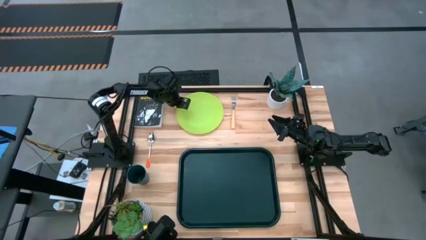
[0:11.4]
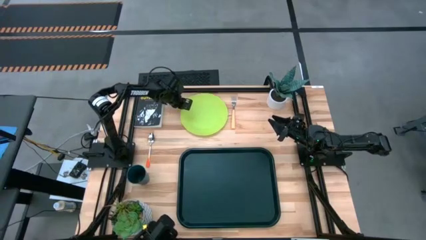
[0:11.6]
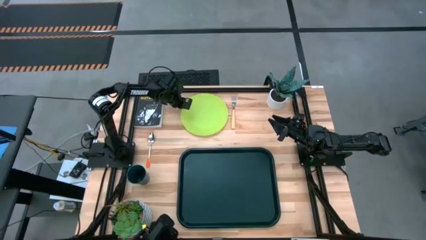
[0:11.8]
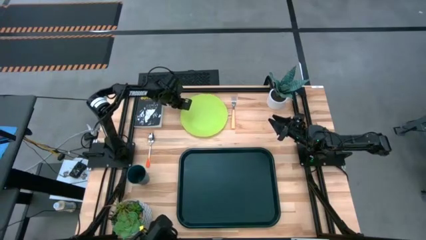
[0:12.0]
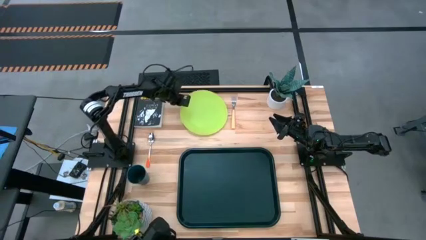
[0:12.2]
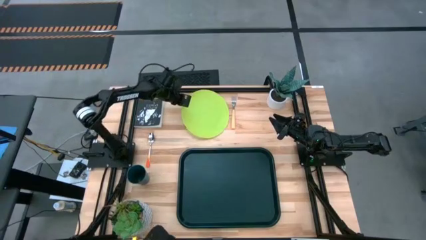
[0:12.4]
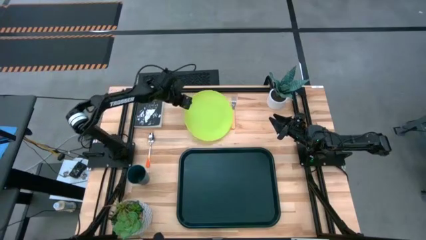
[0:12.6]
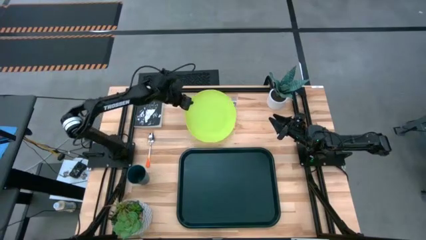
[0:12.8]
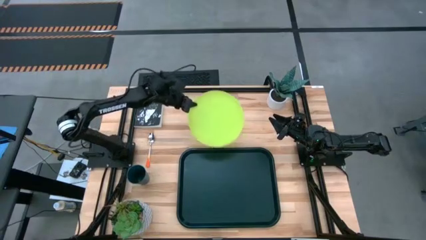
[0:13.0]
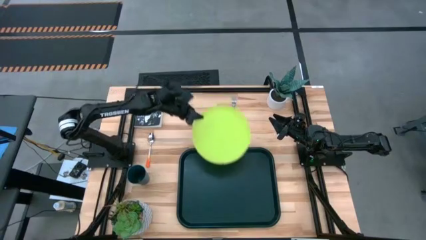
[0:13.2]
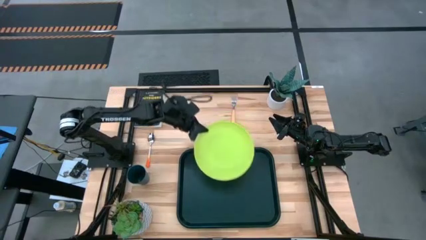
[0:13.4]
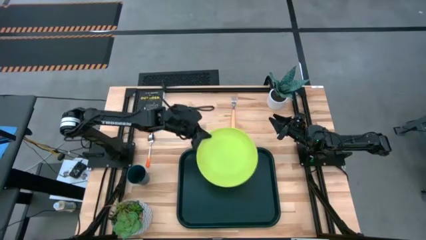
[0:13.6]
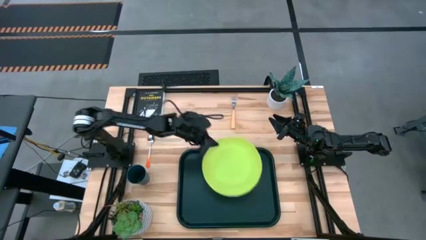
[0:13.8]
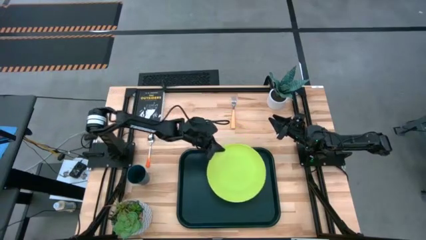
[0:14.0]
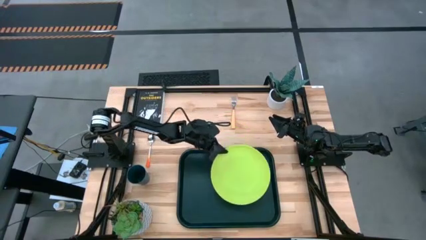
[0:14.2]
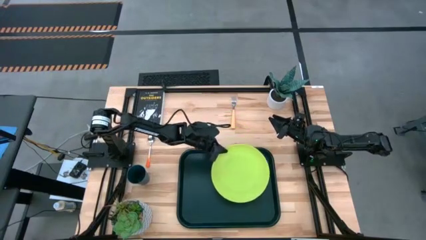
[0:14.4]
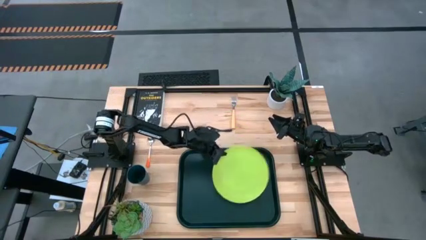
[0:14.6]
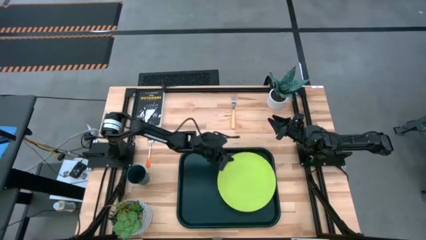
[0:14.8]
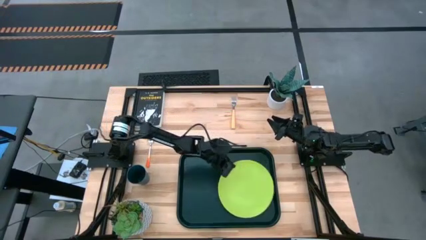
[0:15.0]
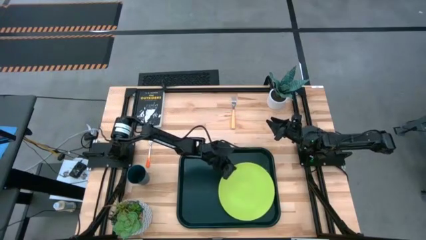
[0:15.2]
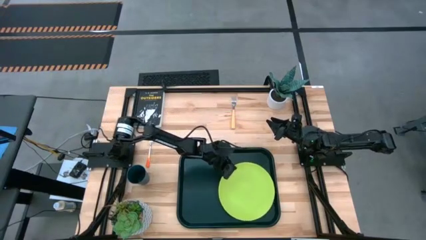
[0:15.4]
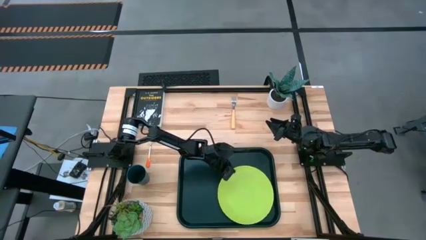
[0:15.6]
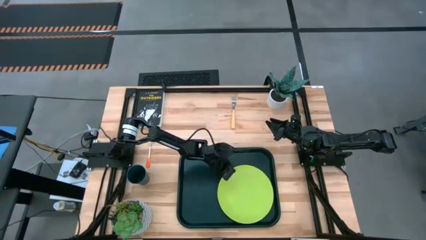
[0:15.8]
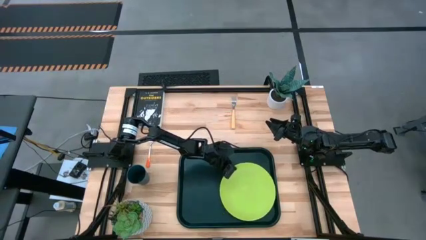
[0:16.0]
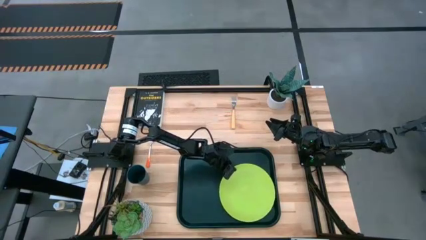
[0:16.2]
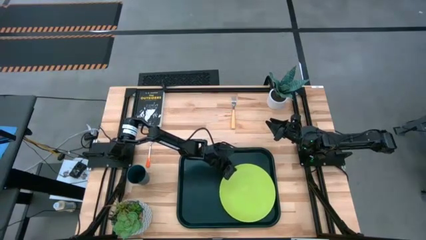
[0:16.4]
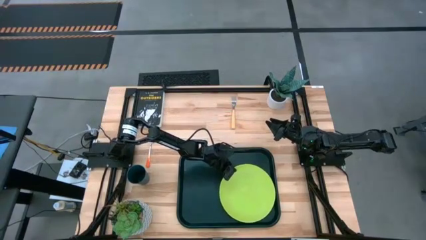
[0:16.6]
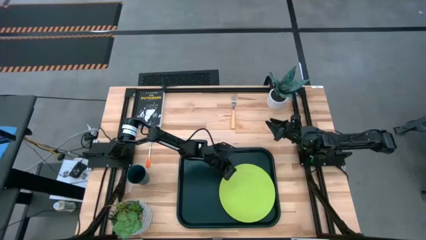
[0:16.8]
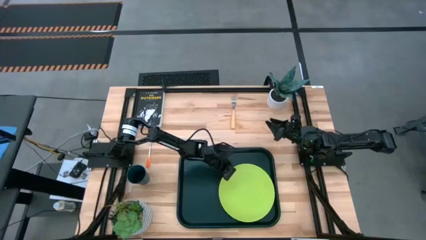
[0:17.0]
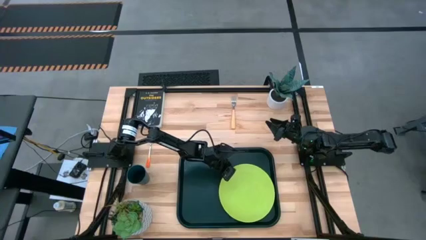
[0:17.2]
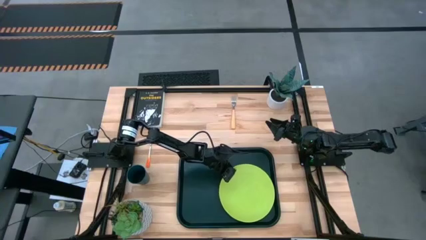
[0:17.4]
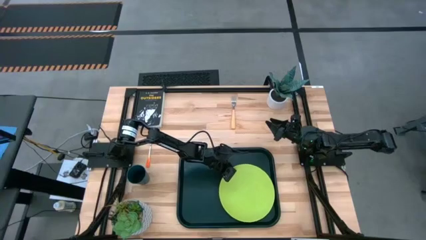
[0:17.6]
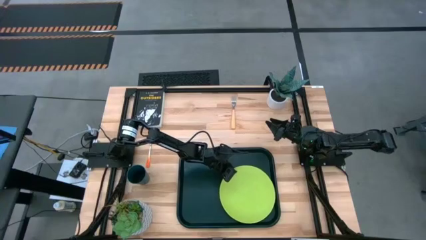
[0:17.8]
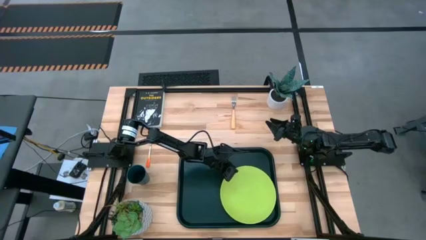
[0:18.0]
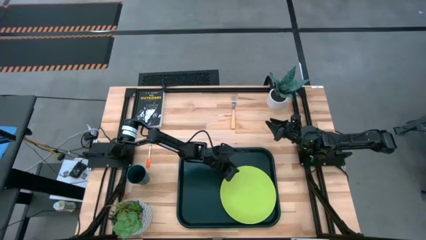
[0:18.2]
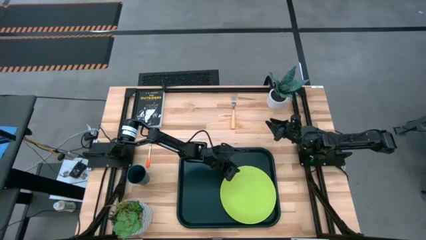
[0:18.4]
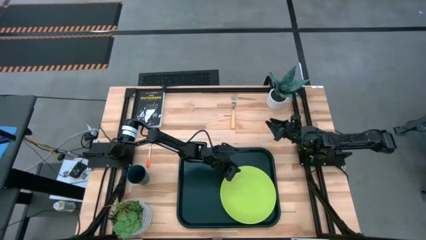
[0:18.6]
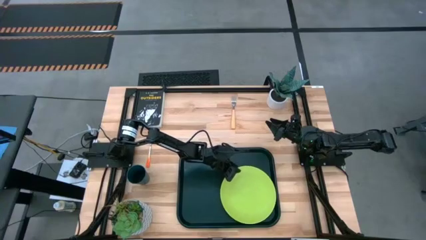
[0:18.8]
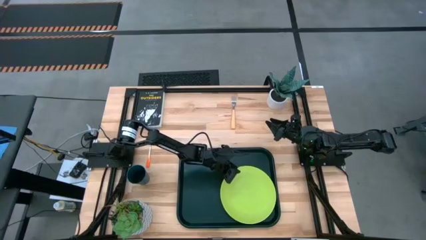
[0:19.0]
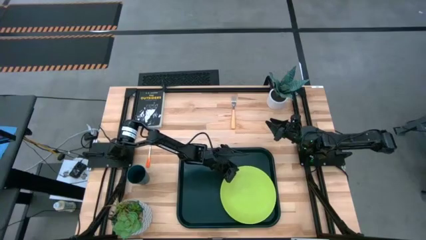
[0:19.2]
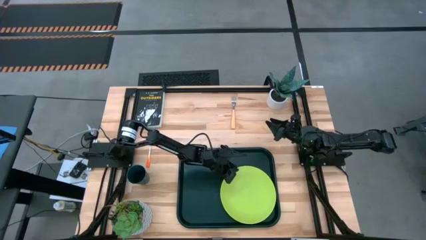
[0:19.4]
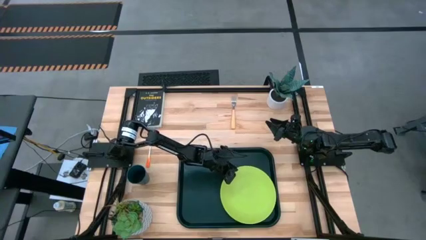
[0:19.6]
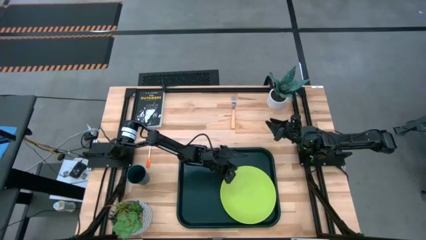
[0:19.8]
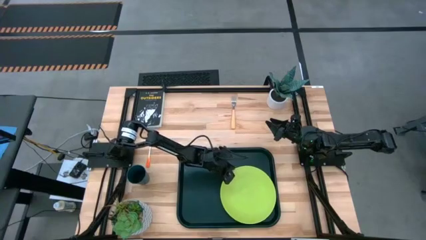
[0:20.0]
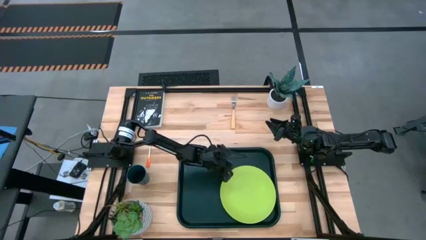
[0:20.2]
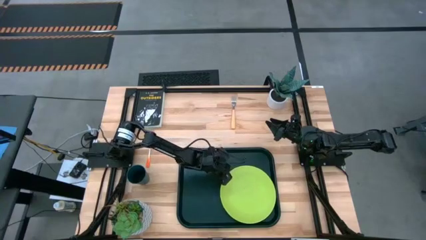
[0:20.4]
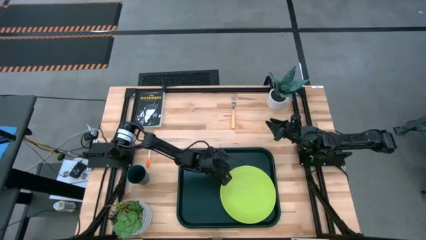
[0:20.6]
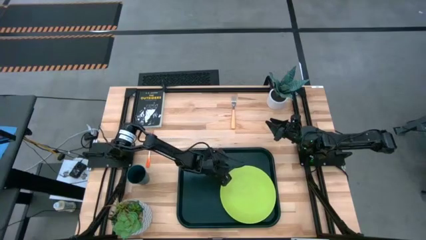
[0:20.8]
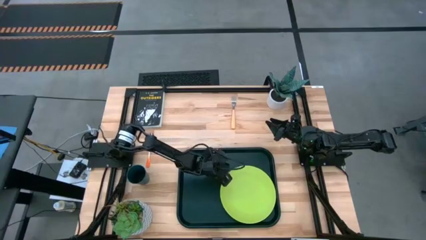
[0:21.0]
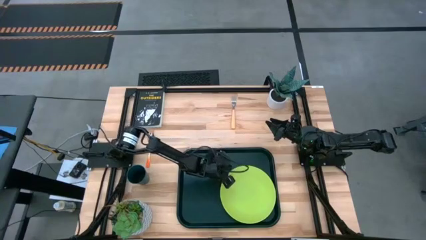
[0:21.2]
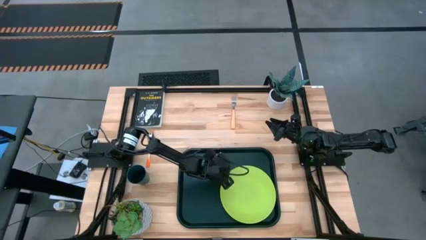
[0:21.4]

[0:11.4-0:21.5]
Task: Pick and place plate/cup/fork/spoon on tray
Put the light green plate on the bottom right of the black serving tray

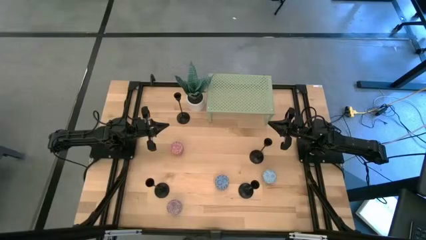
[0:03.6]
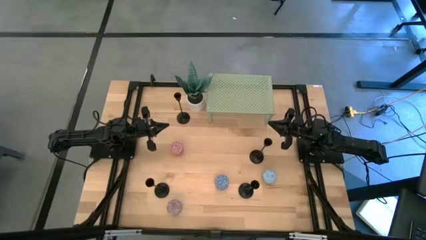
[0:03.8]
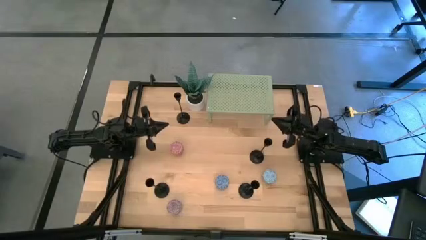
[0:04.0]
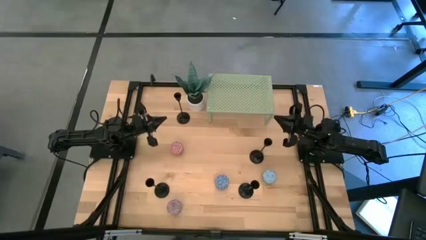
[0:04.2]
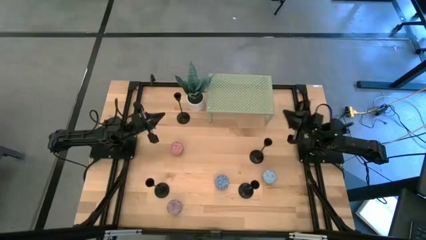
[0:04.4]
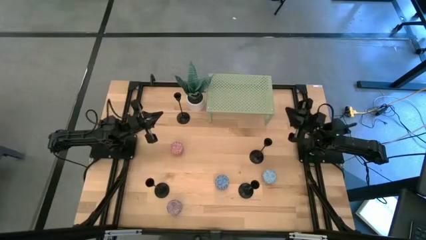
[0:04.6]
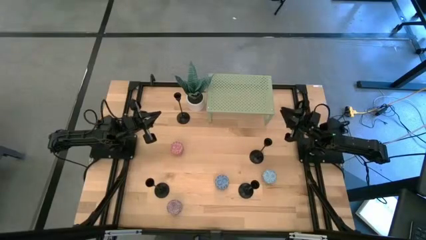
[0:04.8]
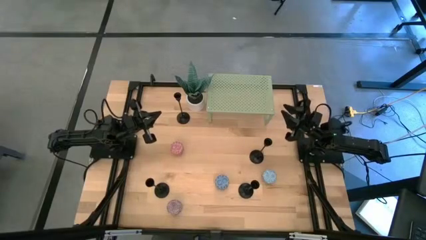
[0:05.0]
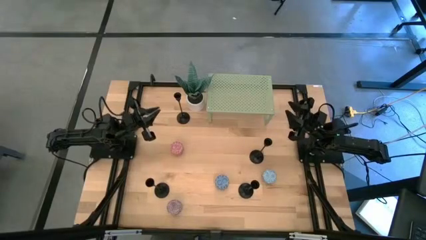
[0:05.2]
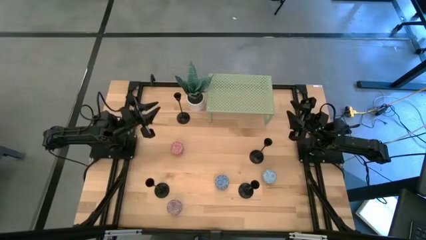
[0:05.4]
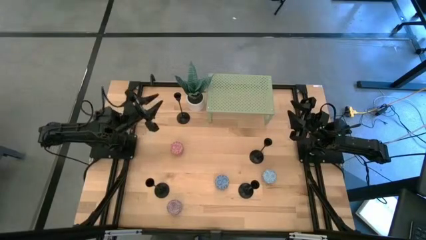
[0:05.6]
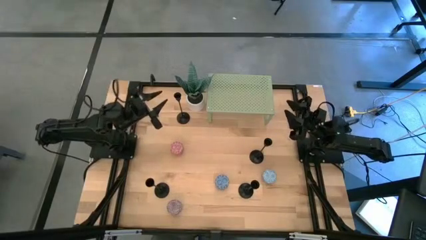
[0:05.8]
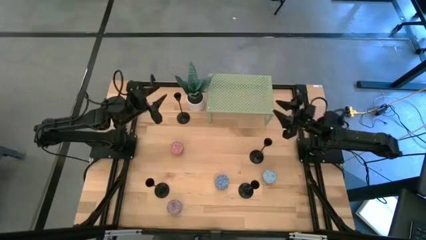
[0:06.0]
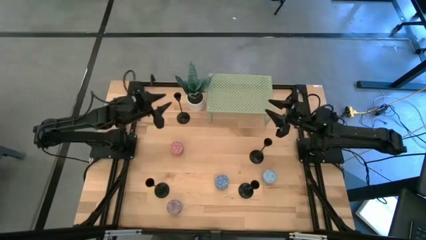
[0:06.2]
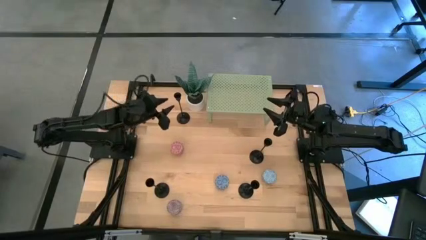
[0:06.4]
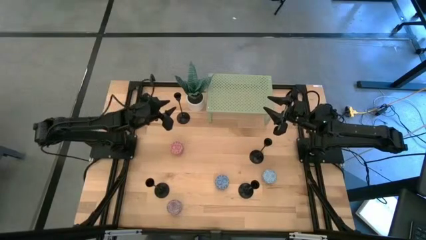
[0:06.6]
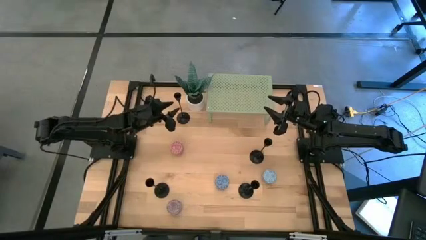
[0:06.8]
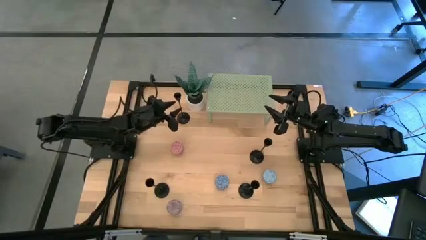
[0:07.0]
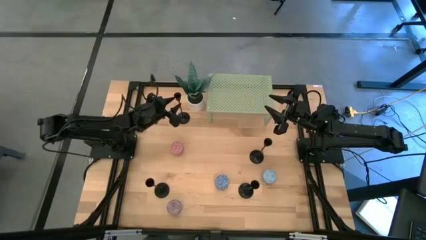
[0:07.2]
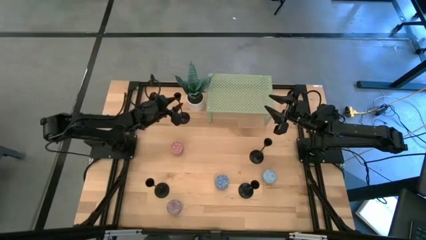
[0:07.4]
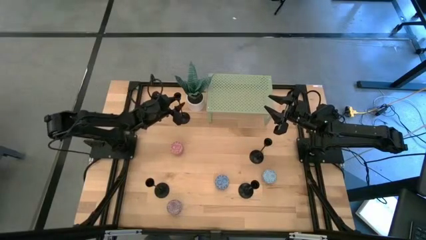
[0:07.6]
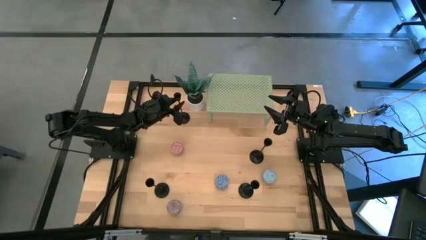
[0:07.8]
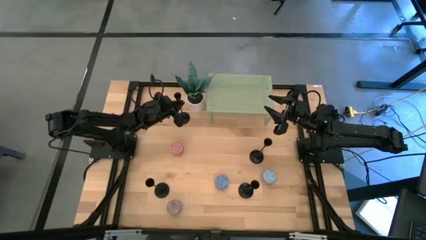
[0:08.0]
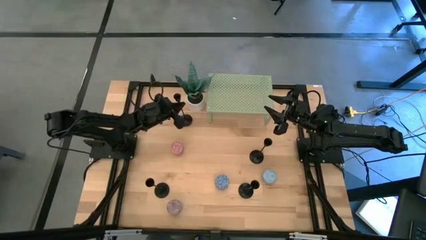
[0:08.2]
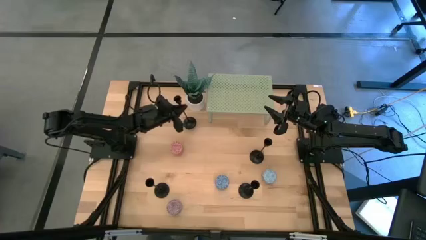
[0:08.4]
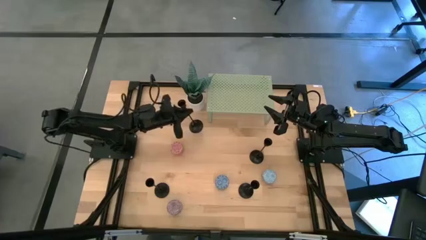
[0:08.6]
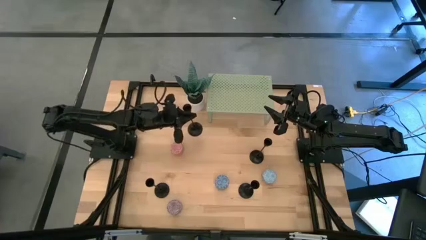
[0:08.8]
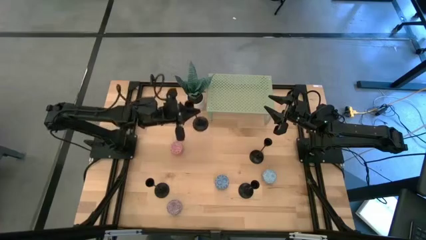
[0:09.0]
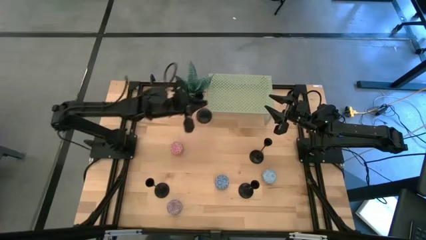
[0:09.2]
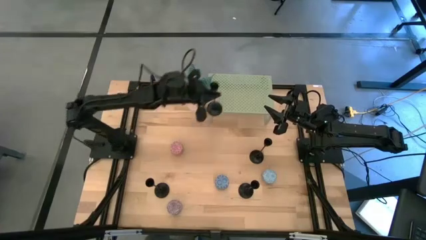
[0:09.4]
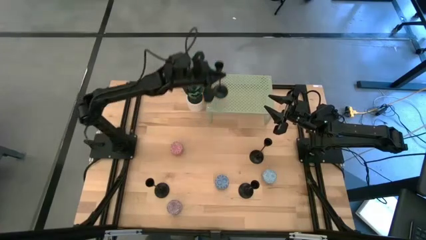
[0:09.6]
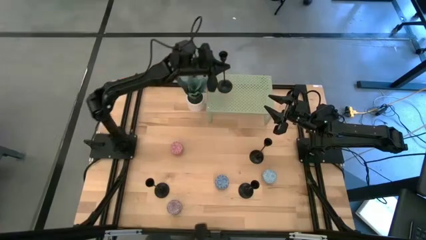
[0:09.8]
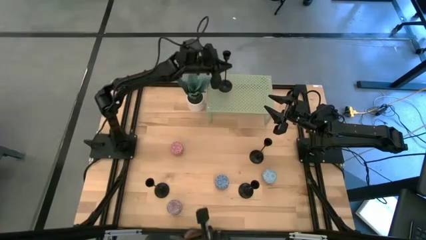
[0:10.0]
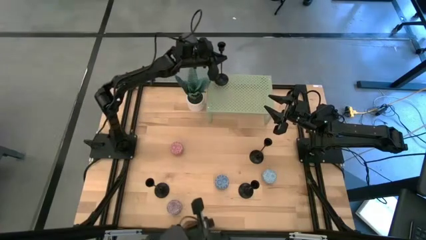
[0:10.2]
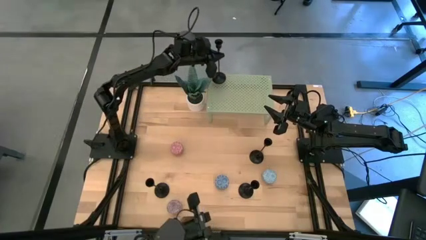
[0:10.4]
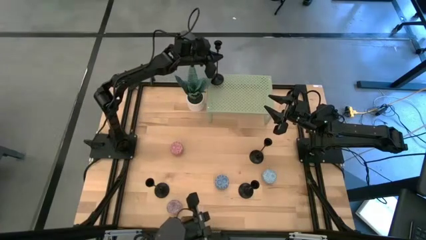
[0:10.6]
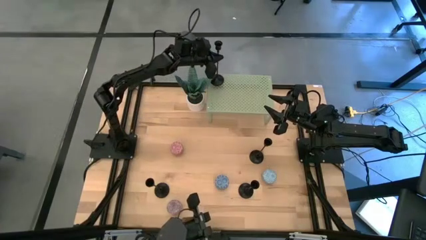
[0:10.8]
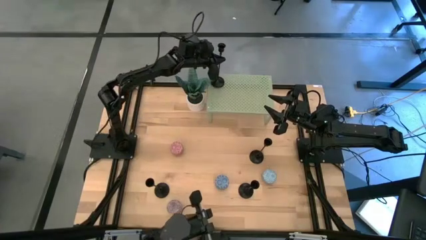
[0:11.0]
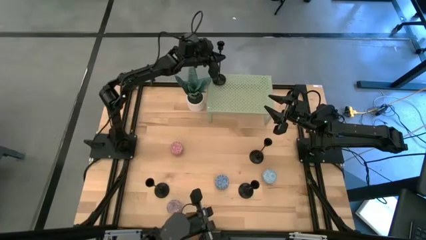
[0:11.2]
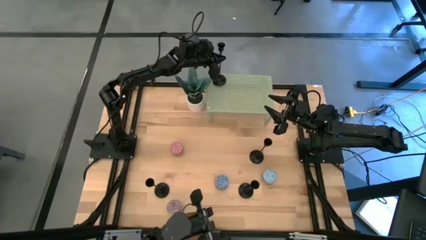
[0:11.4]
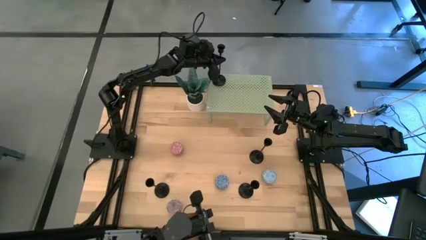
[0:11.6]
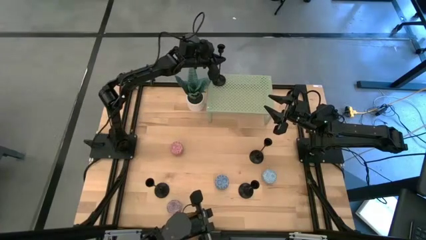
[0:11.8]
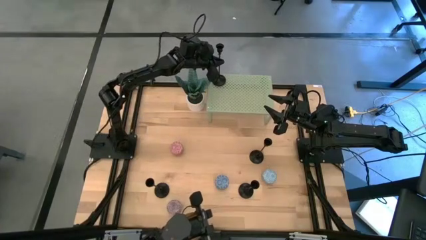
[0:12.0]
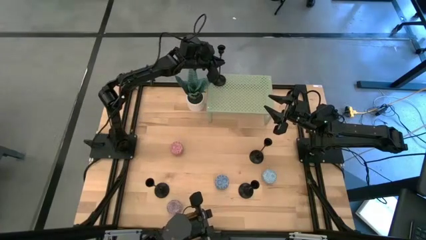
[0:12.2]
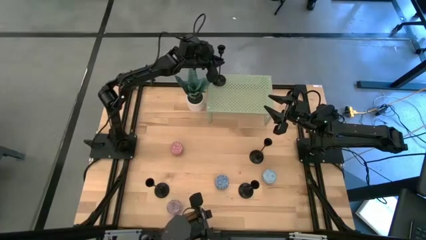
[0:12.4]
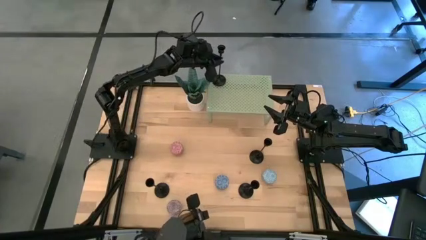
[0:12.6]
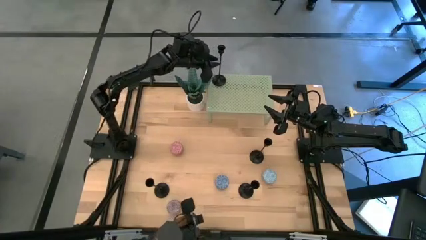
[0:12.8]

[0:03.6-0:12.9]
Task: Pick & Place candle stick holders
Put the black candle holder on the shelf
